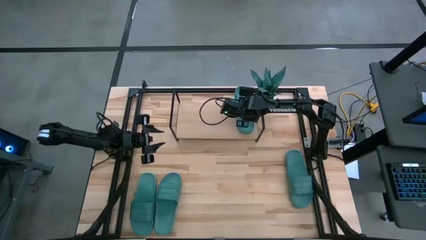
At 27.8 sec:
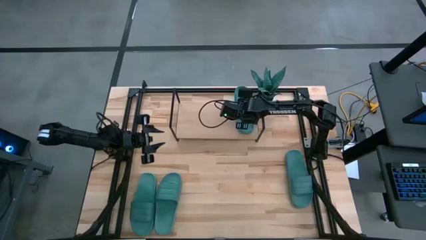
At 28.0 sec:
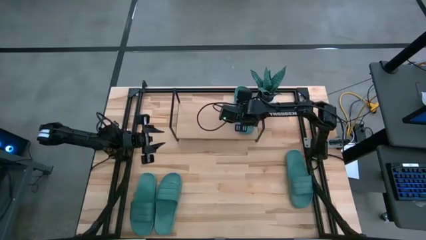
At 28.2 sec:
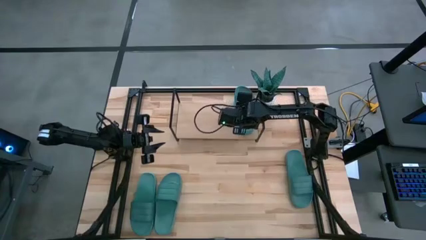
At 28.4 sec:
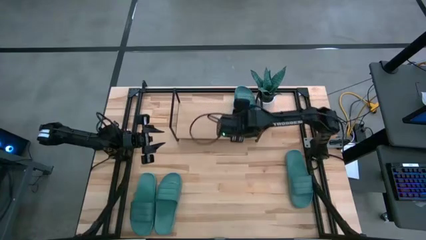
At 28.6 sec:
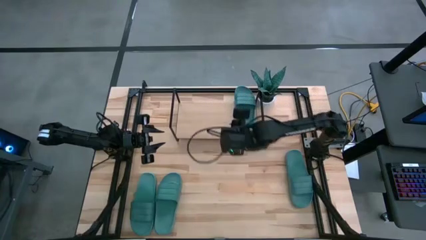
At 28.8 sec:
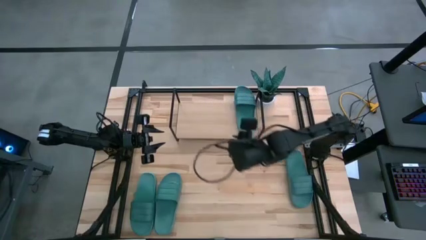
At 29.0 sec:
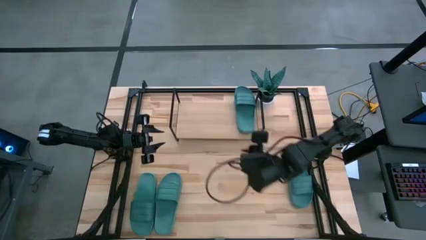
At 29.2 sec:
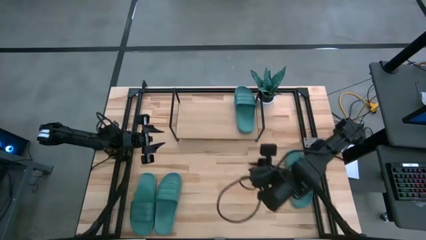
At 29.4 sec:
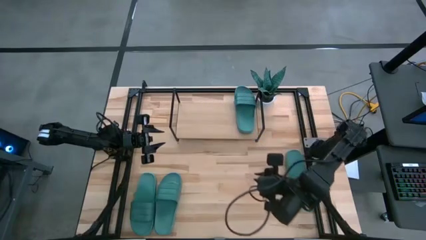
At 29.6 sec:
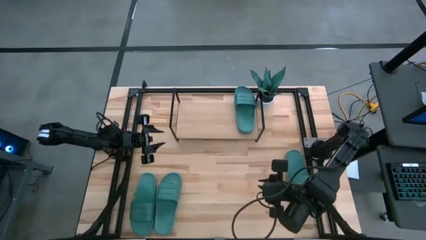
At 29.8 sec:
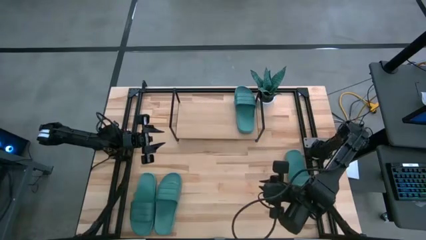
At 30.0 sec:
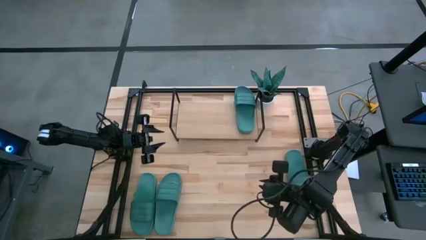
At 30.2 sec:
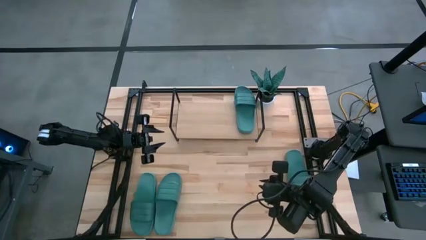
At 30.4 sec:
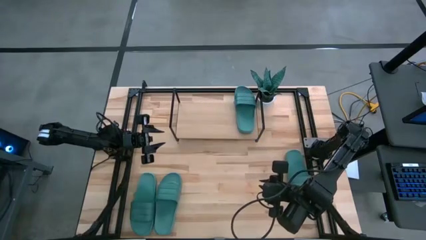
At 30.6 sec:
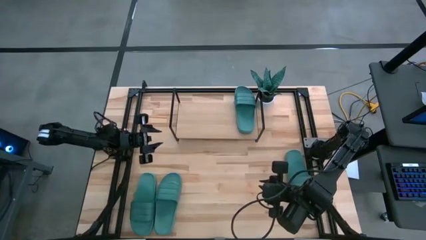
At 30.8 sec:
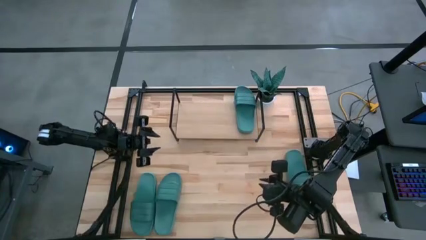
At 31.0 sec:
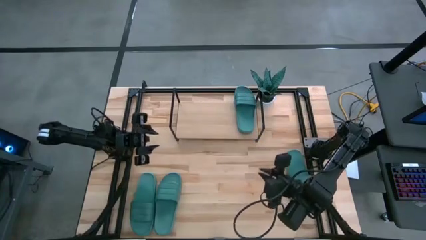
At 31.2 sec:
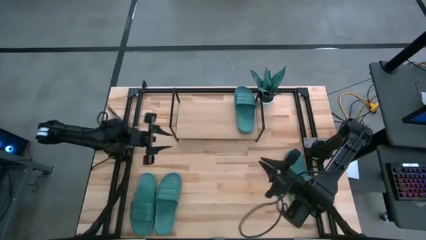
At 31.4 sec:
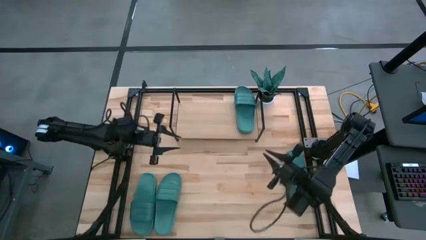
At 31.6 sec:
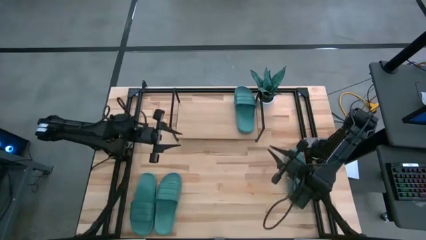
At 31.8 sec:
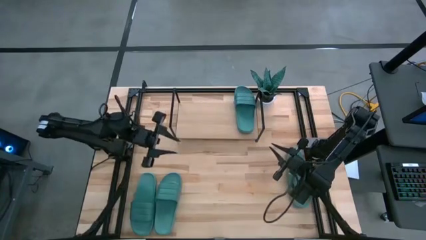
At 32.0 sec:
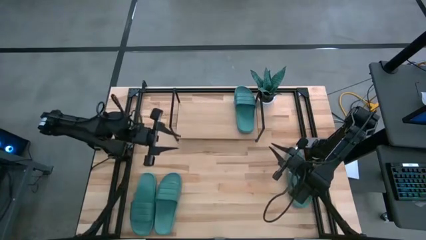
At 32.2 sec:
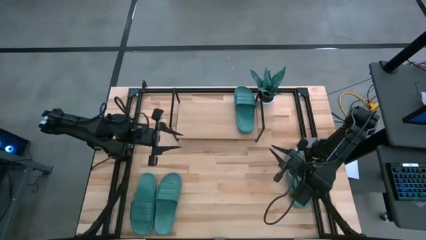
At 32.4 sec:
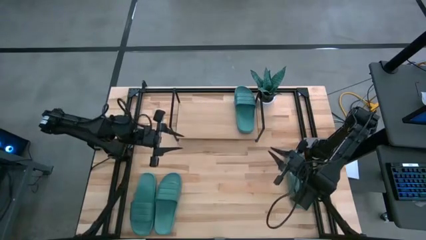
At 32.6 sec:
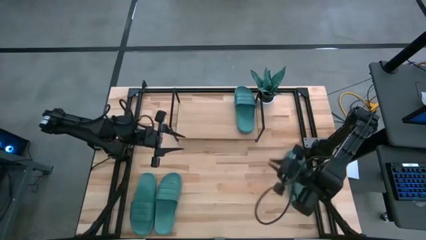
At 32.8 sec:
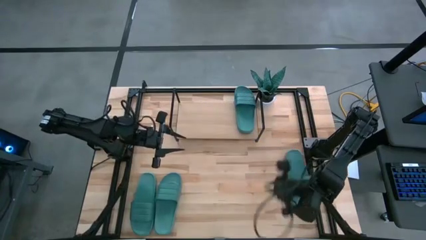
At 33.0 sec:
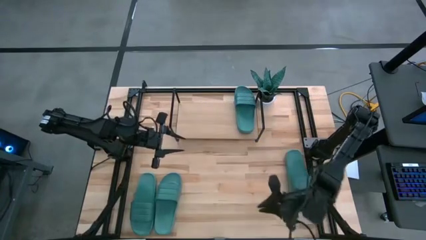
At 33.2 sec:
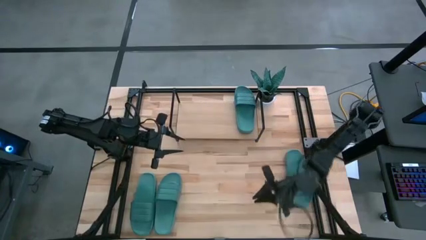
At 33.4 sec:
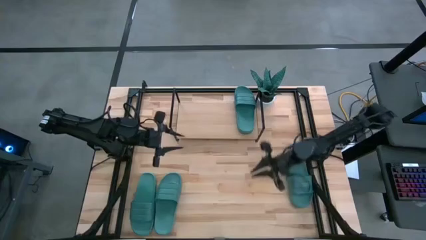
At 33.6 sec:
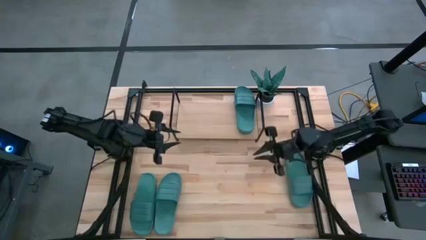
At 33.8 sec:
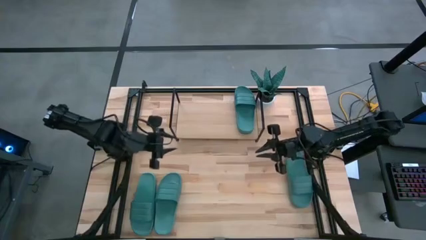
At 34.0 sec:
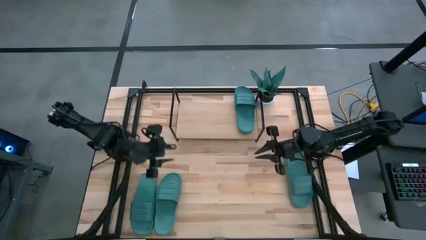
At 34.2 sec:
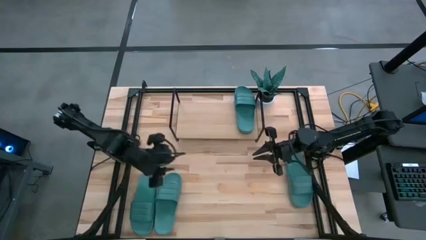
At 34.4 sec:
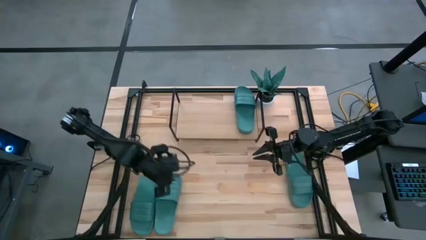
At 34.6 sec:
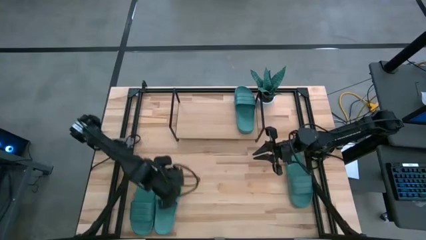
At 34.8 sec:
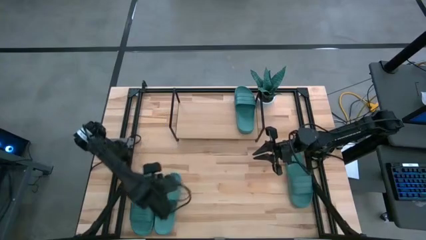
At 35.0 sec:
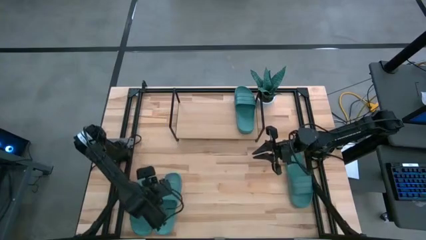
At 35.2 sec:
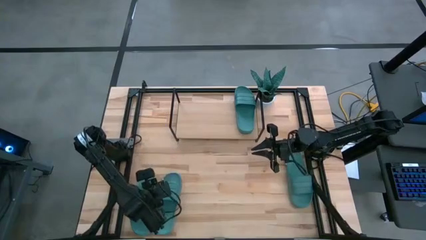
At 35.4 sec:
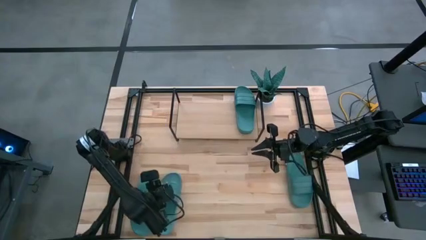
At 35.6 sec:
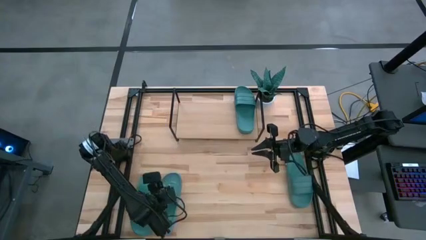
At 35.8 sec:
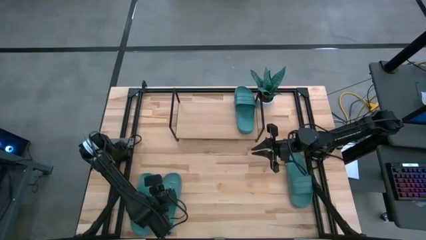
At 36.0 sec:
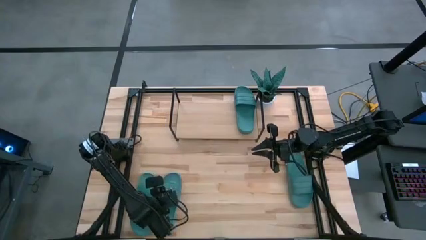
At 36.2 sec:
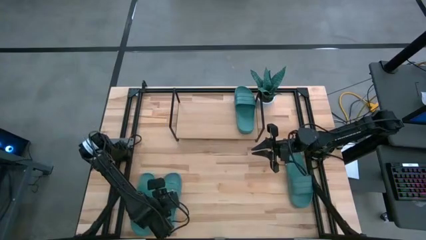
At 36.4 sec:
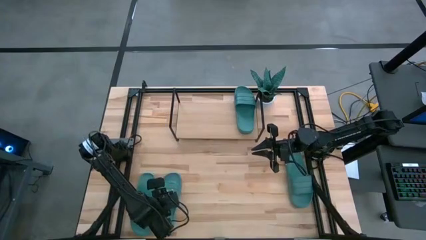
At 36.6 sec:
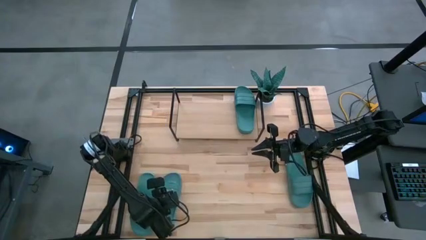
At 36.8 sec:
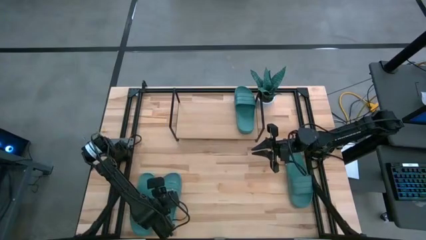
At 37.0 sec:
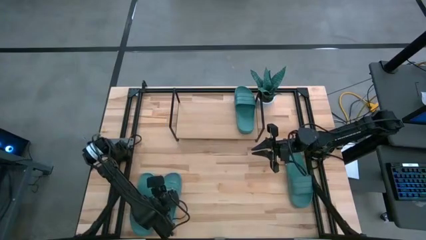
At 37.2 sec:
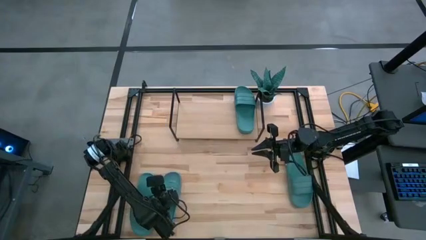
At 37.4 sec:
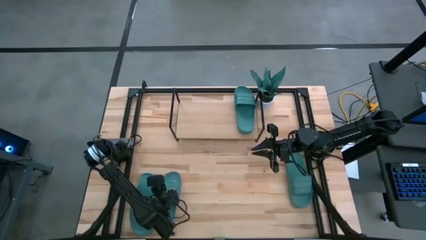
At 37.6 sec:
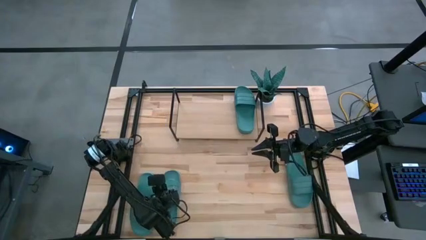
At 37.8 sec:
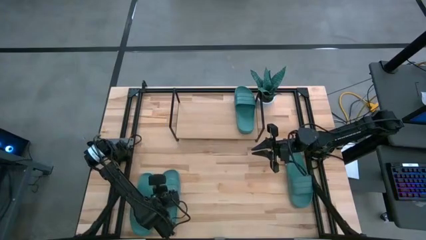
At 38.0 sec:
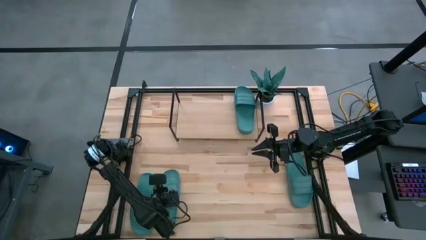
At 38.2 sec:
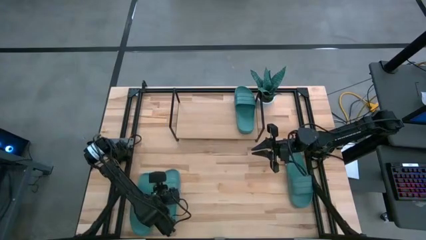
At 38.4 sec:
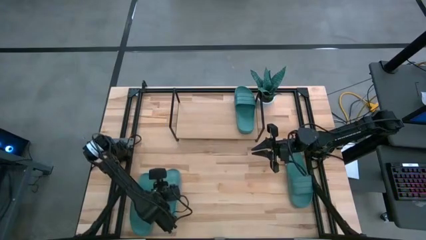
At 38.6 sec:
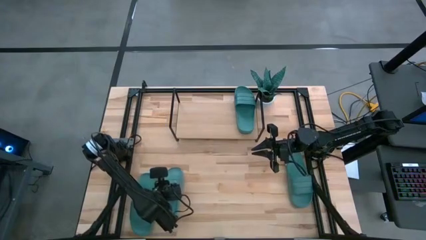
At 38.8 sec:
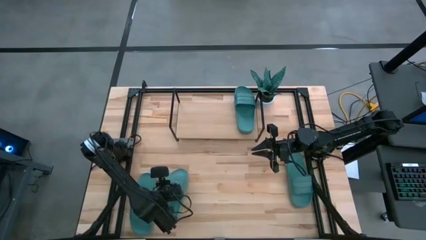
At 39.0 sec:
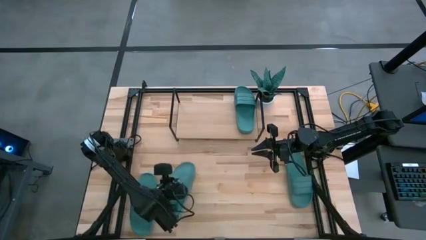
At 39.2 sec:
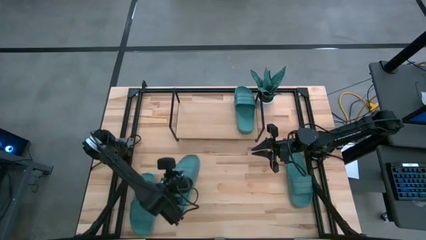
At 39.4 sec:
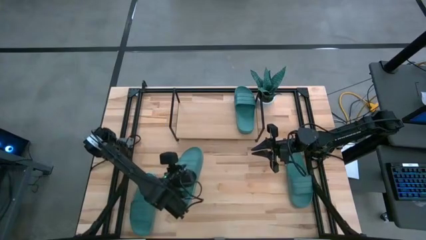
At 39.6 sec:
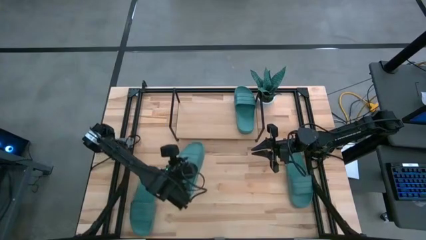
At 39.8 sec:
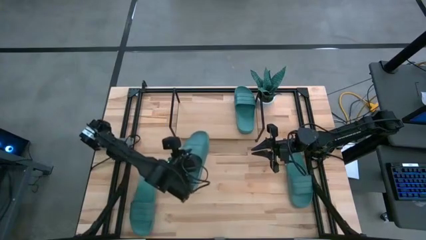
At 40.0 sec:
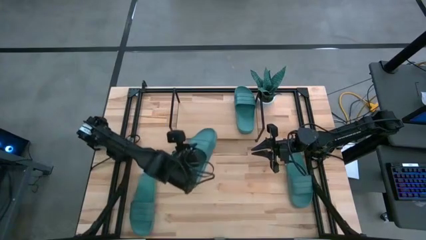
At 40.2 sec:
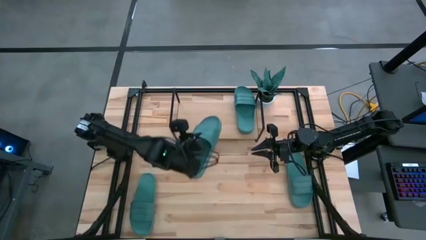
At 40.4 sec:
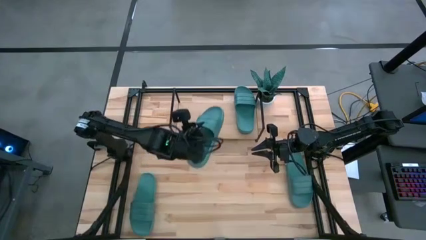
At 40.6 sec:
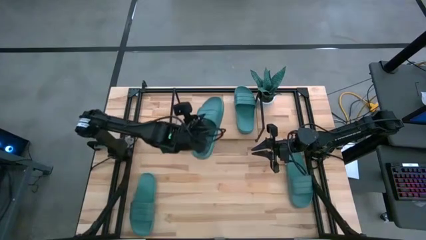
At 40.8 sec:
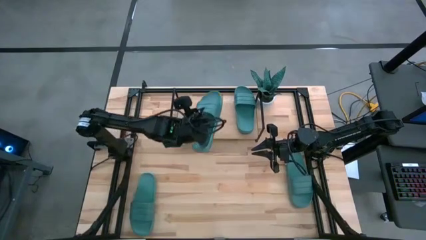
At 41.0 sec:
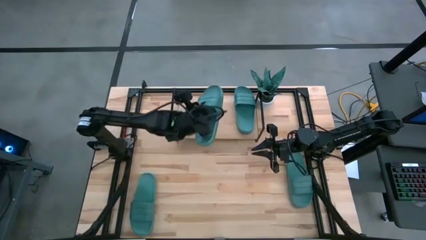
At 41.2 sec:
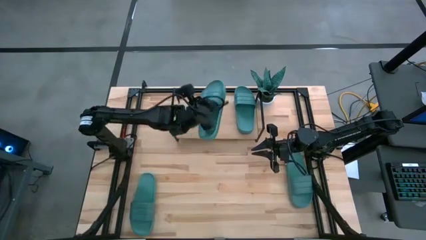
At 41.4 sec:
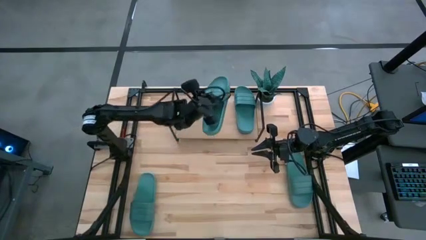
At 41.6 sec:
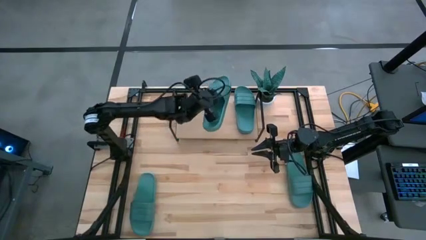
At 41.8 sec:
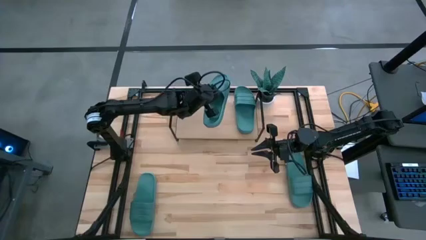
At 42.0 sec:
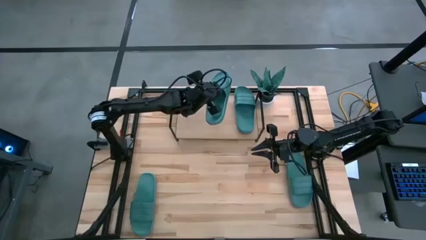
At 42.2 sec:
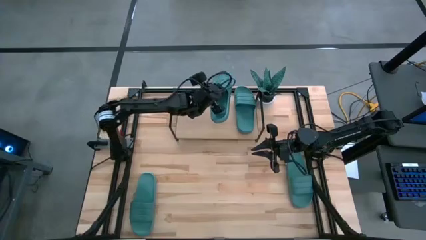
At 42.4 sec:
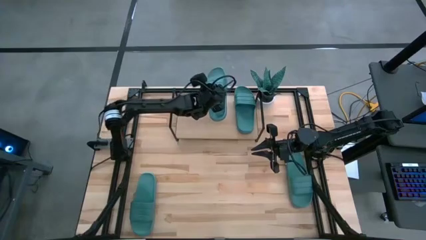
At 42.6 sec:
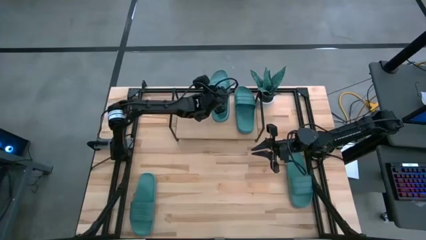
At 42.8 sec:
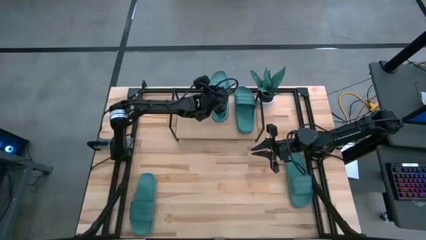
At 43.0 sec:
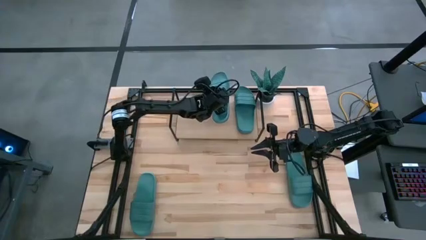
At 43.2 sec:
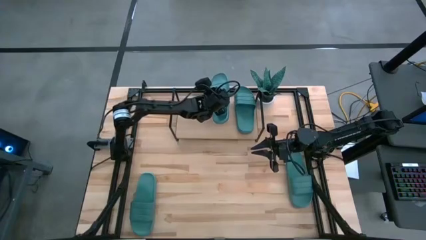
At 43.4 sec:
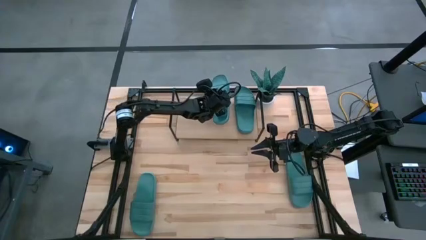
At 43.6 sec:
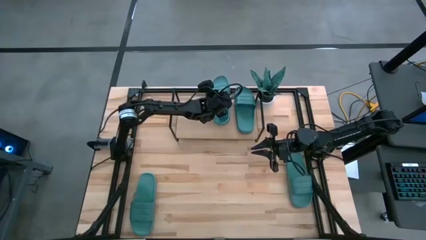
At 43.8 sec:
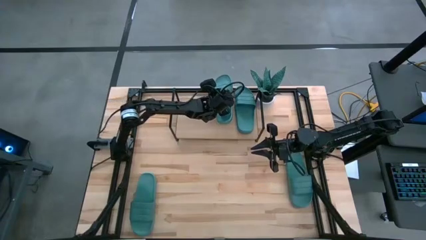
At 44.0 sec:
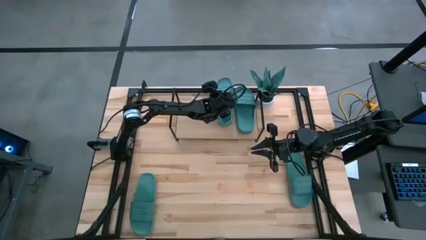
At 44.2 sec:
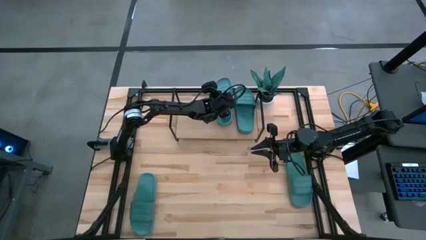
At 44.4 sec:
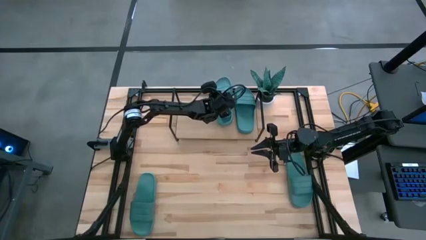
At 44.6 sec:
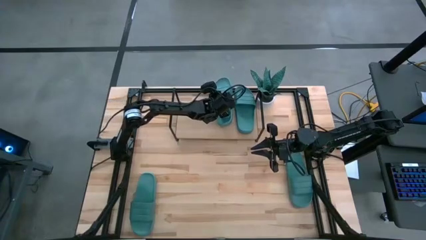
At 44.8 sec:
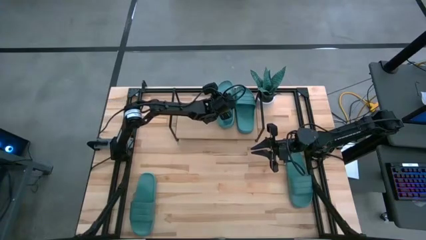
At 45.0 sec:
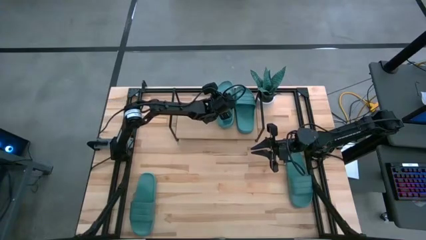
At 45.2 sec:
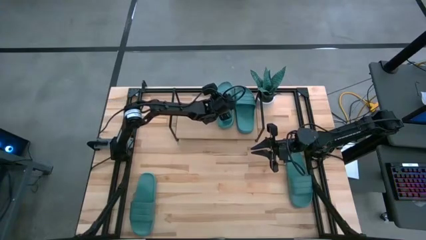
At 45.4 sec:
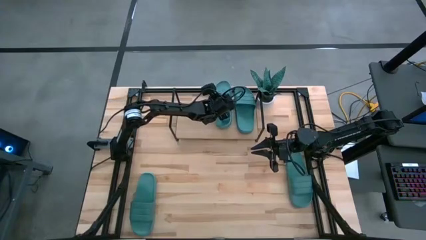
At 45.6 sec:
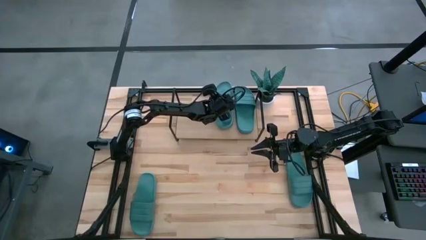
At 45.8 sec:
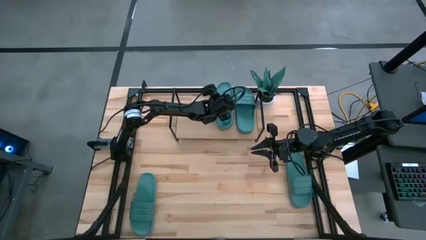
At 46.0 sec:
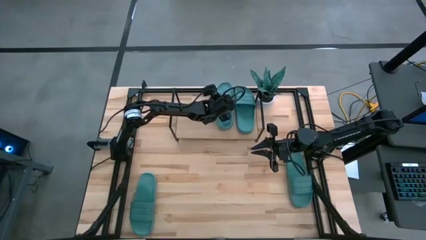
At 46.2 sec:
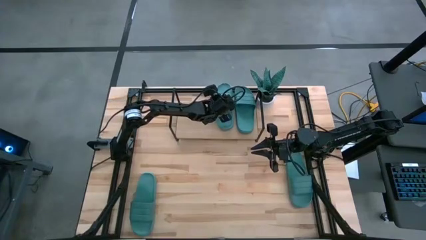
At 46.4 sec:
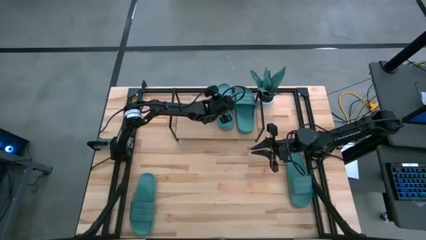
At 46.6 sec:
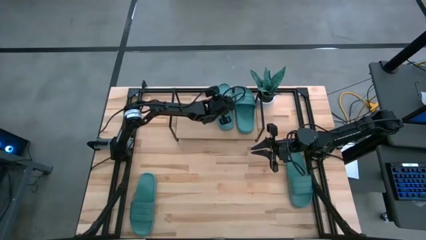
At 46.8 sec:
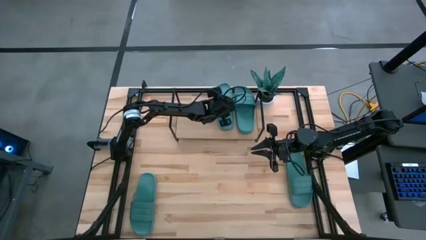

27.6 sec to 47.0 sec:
Task: Pick and place slides into the shelf
Put the green slipper on the shelf
